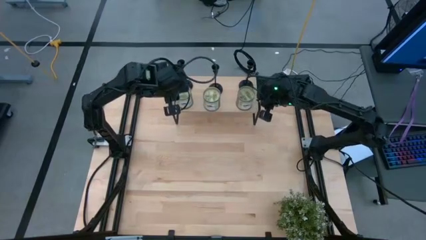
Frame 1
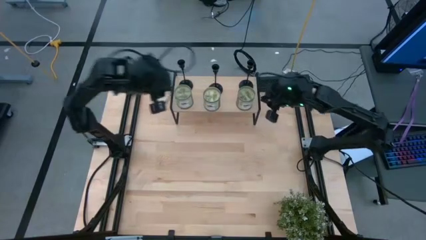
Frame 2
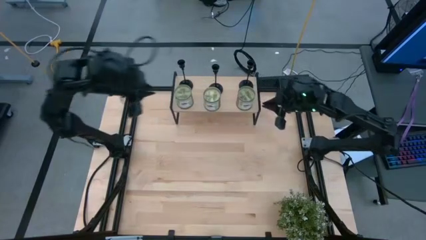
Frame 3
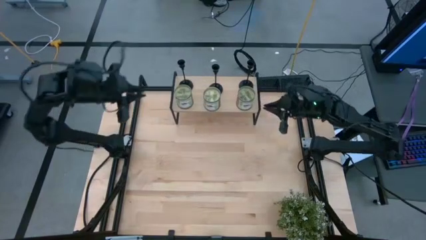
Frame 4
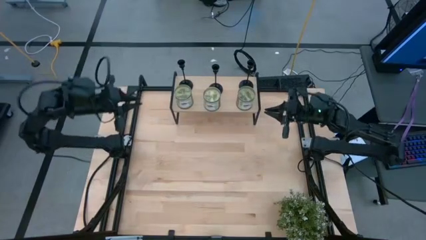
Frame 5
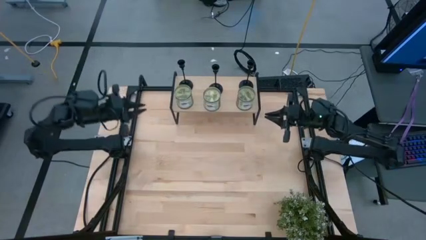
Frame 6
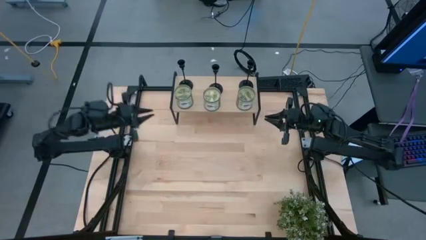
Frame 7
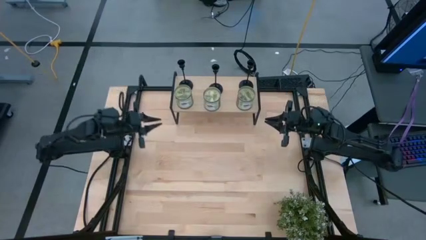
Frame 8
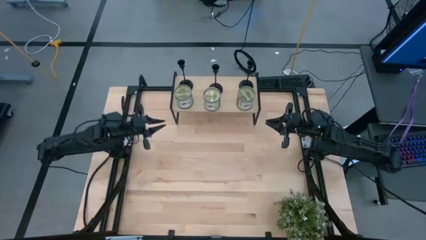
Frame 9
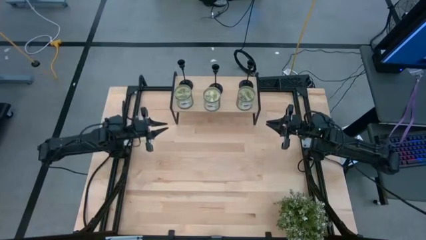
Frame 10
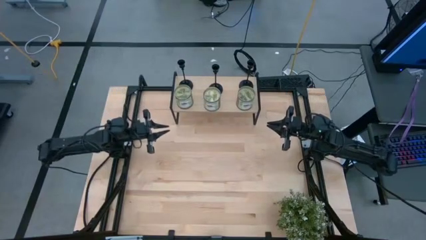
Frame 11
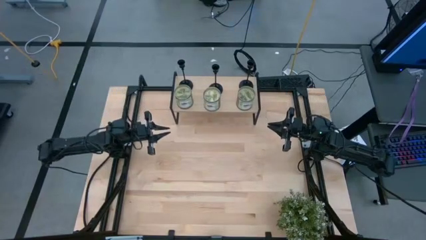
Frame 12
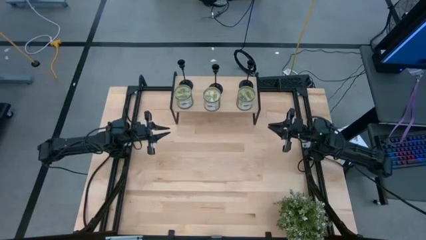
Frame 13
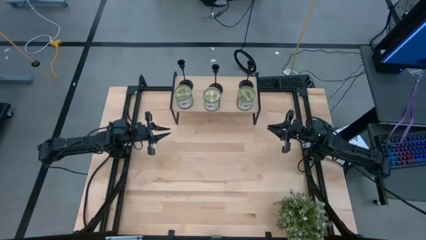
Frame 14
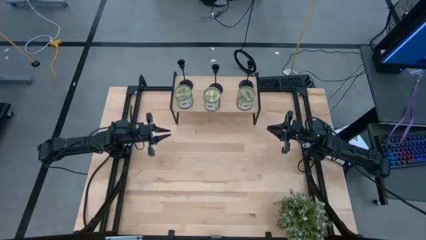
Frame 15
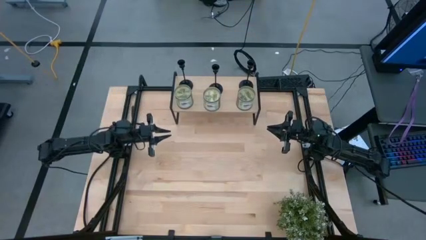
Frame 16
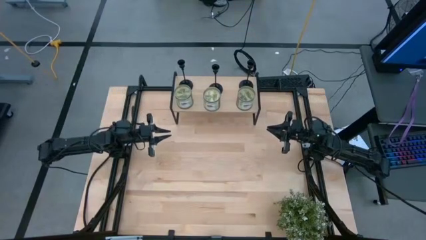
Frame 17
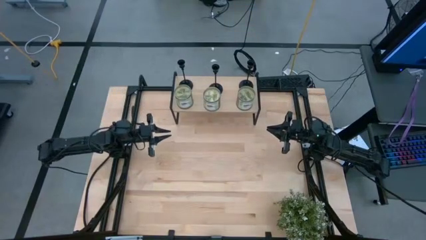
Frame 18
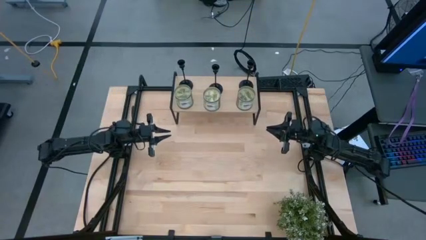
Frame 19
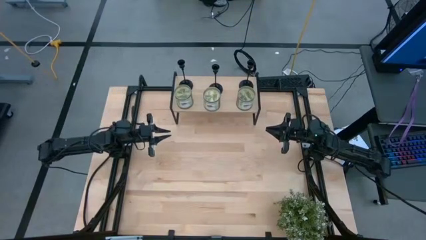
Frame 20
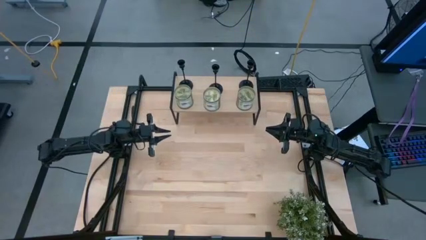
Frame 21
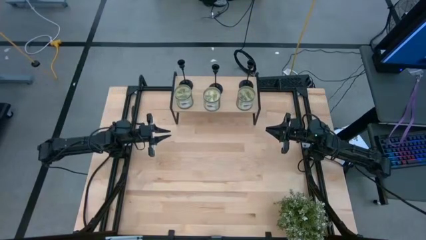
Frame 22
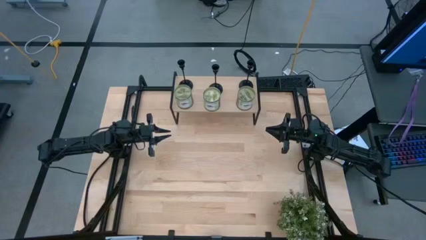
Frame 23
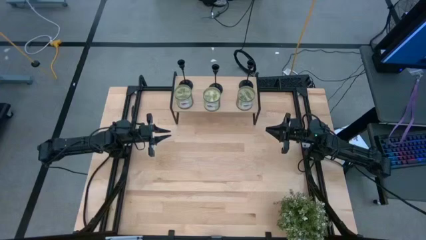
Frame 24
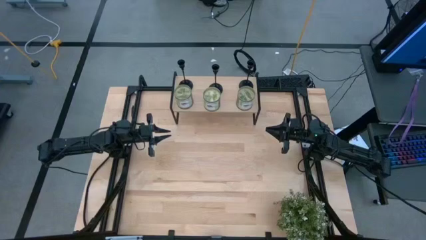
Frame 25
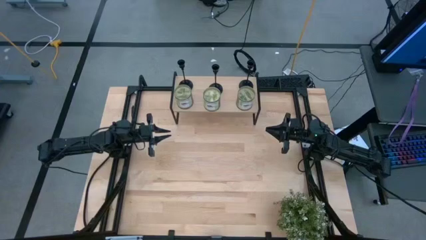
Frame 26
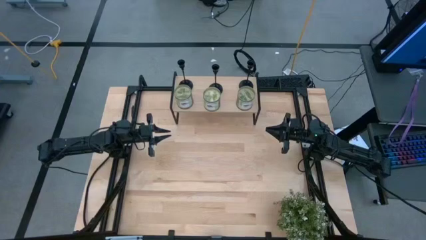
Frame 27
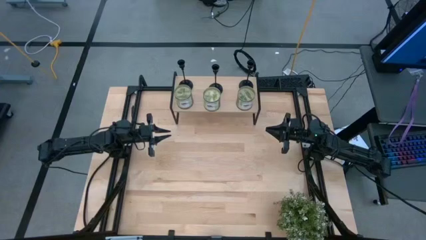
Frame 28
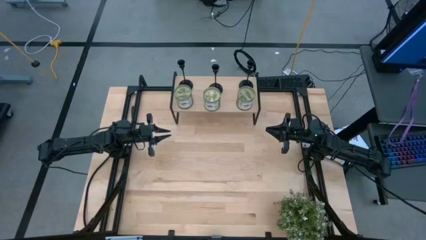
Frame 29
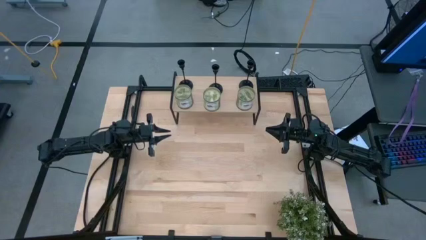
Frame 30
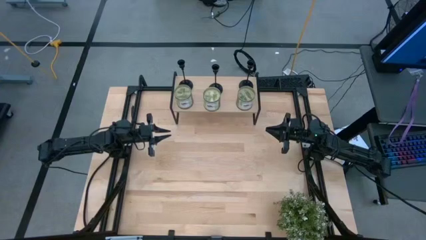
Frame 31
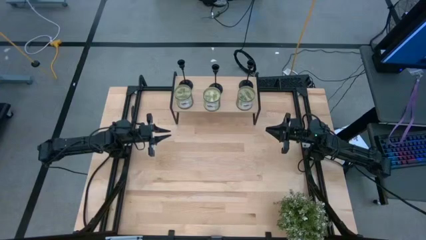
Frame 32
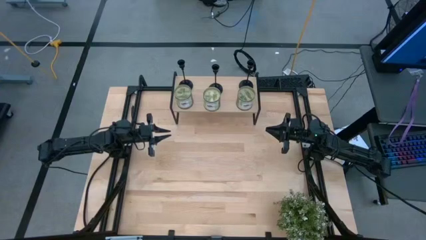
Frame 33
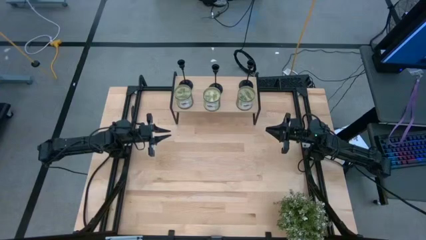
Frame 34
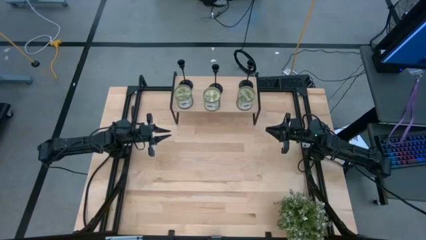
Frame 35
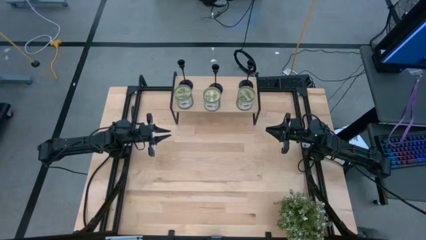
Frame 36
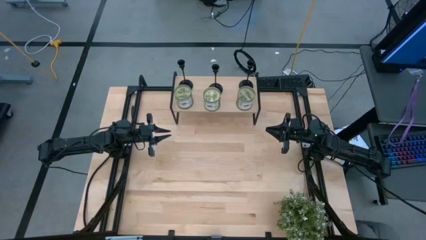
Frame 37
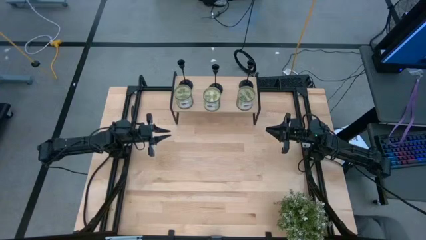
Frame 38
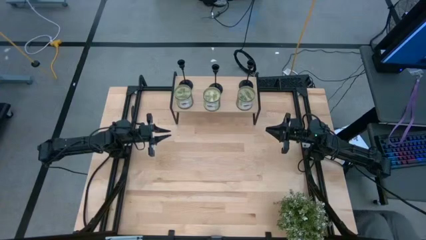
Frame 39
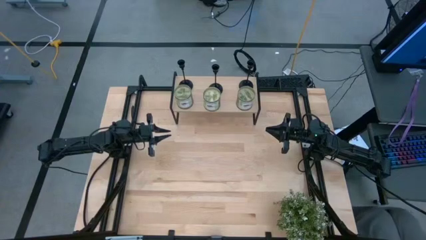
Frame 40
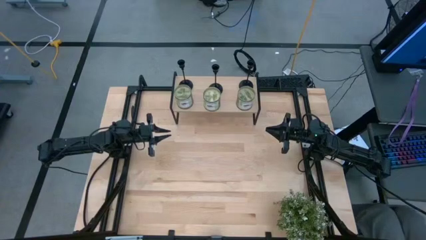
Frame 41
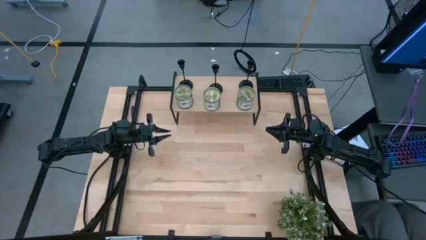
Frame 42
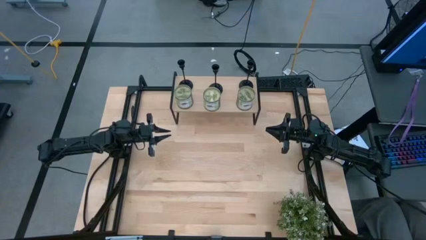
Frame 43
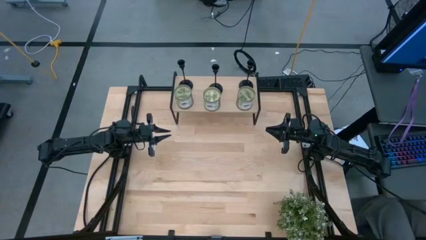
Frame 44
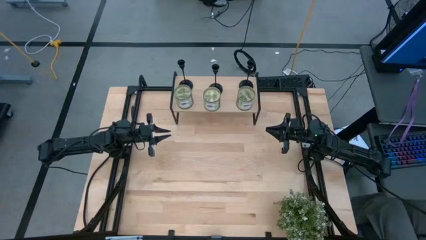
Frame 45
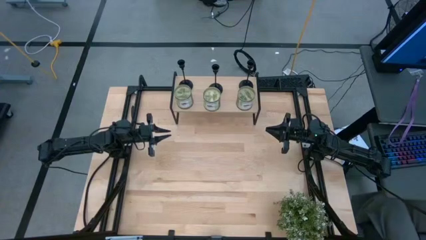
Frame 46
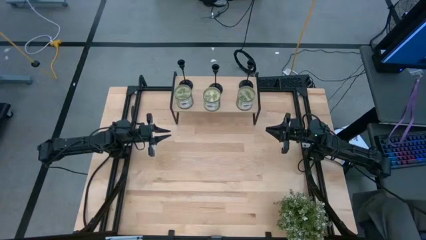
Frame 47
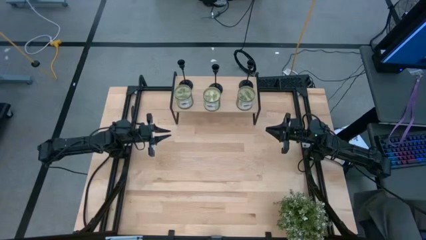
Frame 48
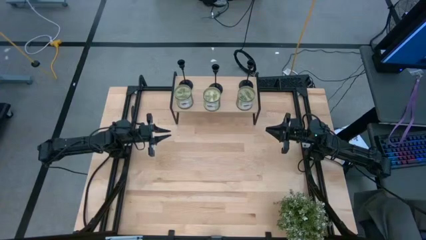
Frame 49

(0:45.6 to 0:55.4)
Task: Pick & Place candle stick holders
Return to Home Position

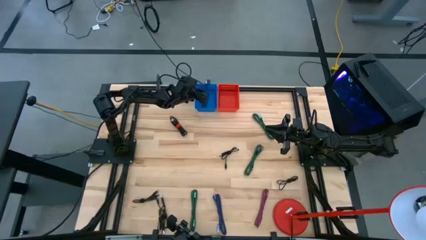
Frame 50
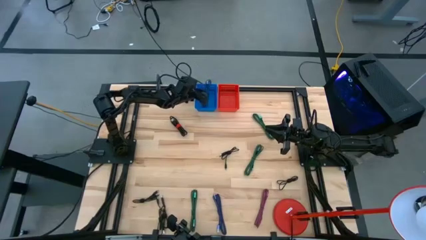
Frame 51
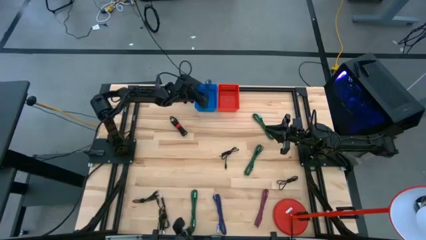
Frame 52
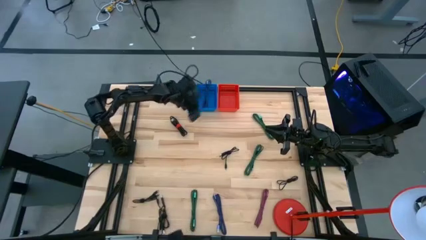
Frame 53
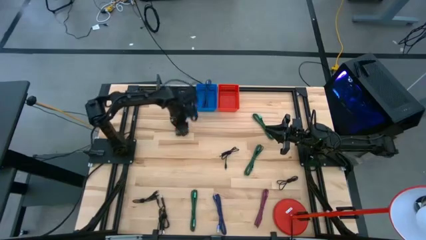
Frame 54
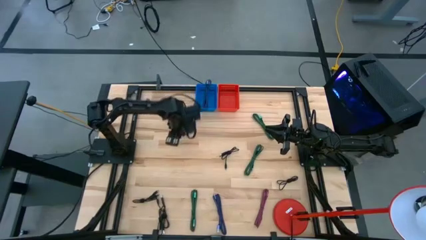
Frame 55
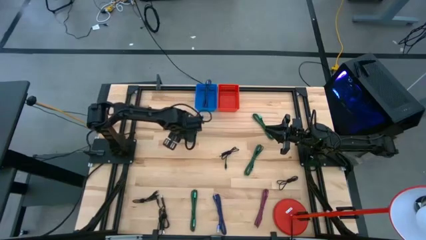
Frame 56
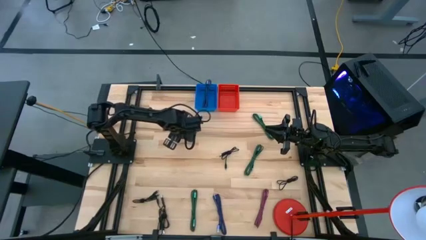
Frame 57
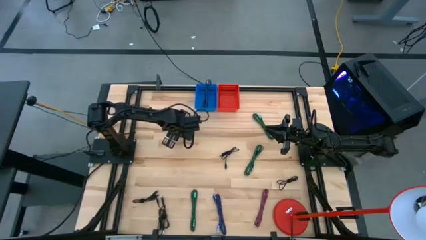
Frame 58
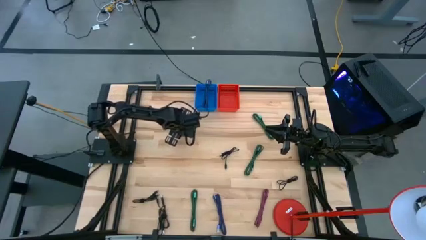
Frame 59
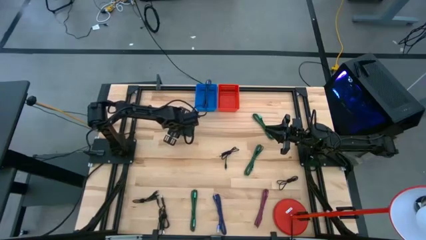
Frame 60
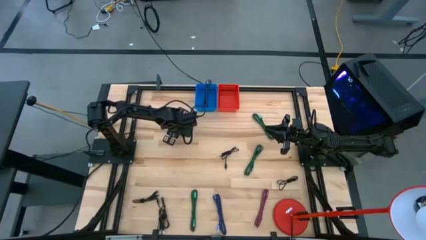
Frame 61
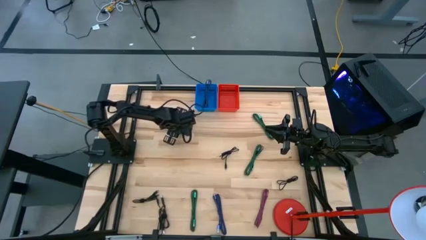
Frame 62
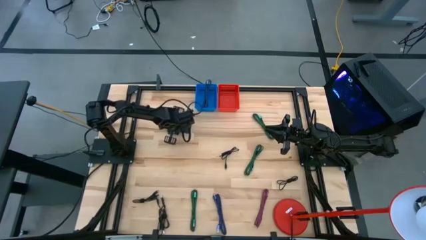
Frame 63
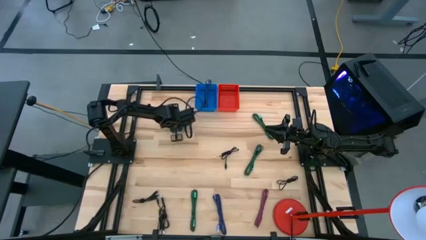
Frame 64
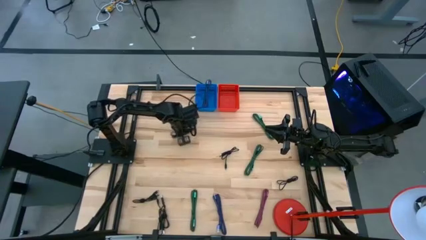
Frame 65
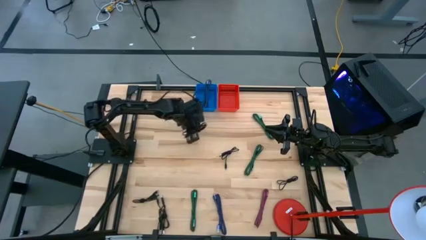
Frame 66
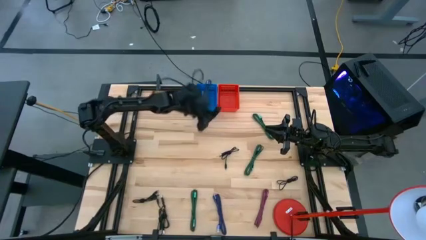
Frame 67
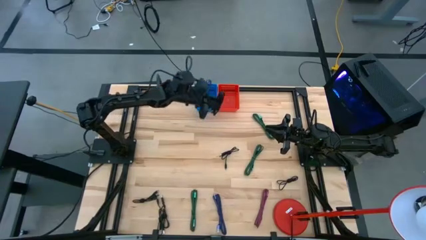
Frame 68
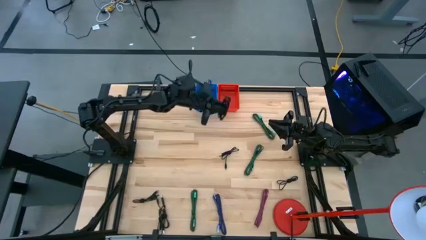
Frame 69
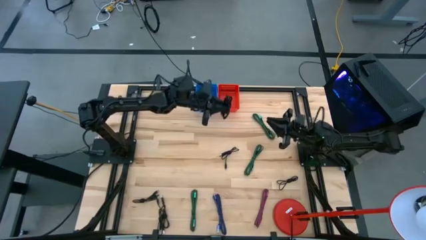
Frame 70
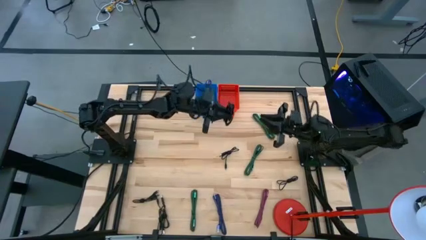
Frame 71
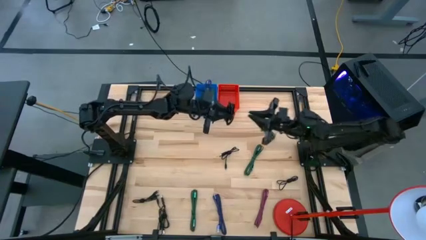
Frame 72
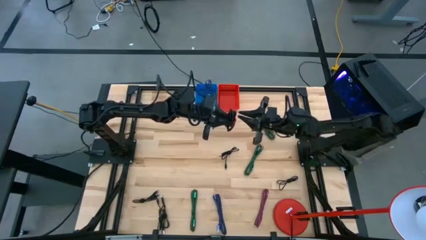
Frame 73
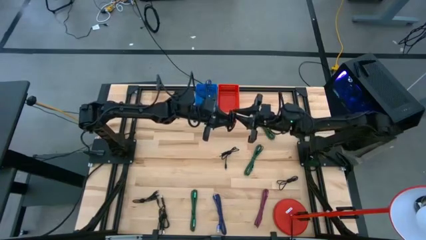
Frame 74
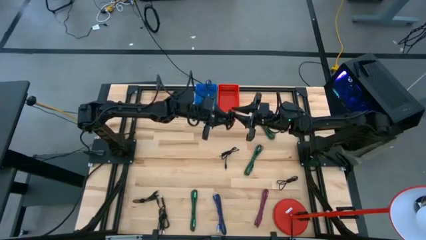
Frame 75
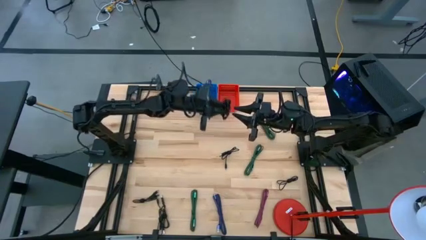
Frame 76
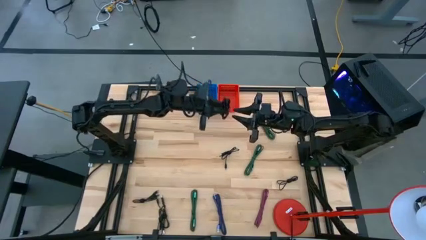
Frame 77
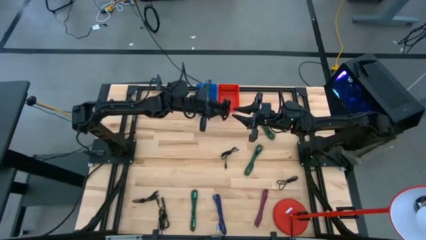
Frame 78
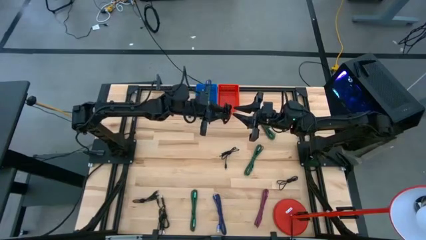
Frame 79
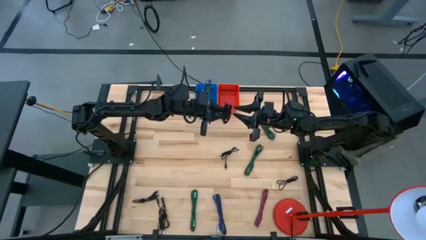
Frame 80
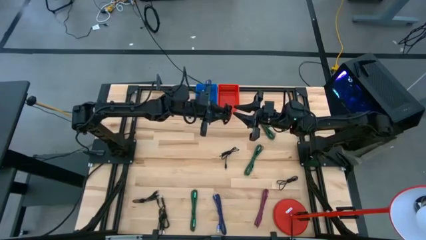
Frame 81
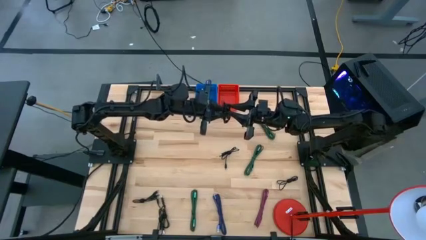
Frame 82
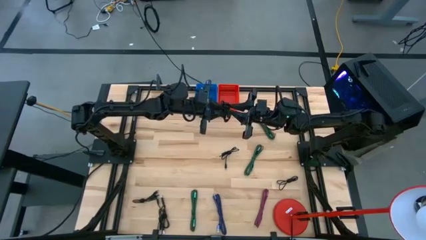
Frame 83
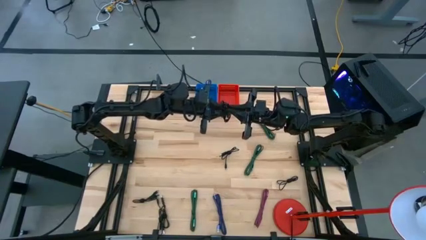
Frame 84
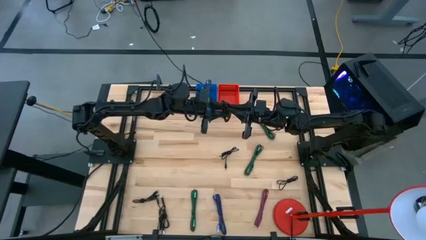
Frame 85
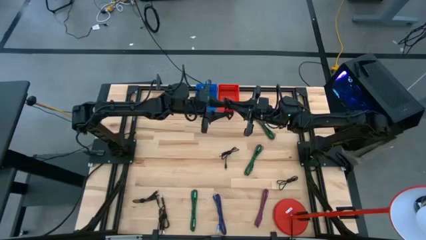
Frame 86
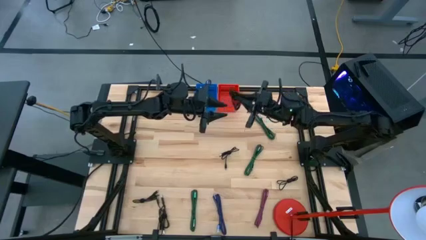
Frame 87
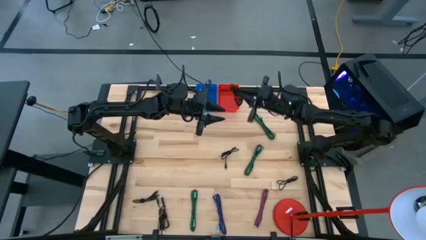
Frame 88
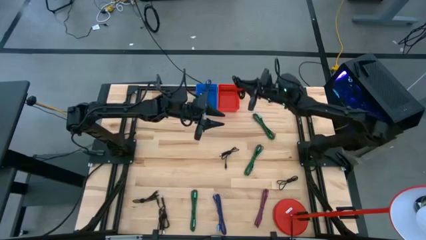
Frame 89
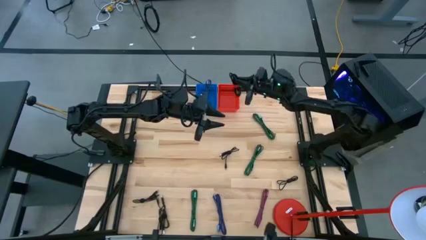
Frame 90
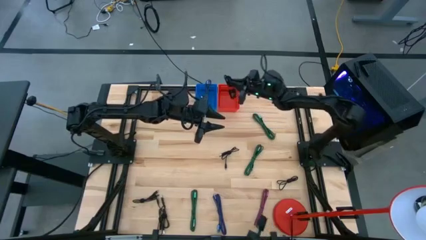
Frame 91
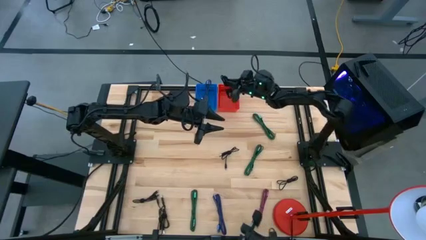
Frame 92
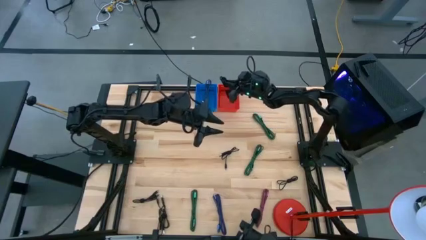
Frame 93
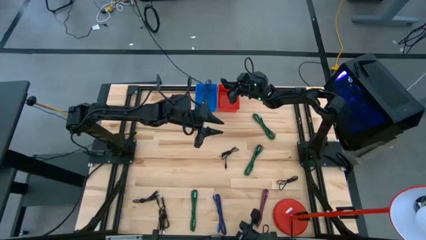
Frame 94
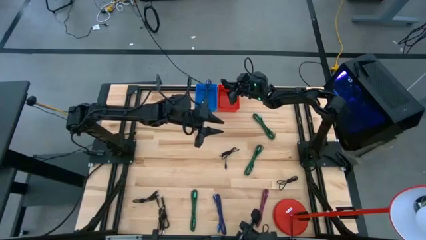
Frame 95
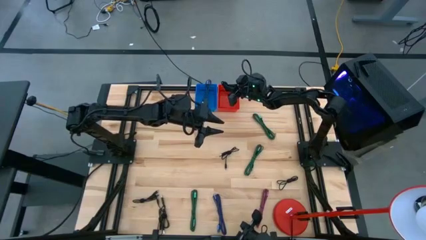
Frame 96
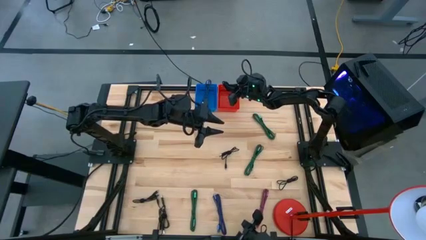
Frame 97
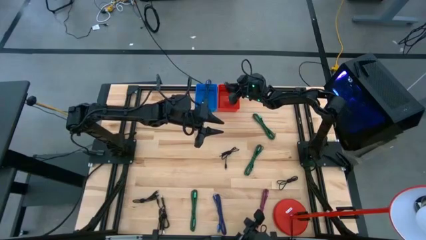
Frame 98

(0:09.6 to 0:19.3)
Task: Pick & Place USB Port
Put the black charger cable into the red bin
